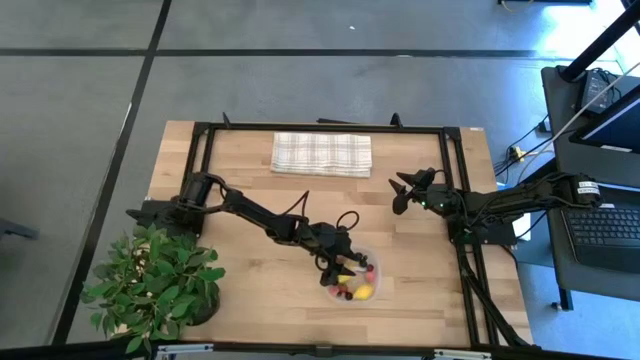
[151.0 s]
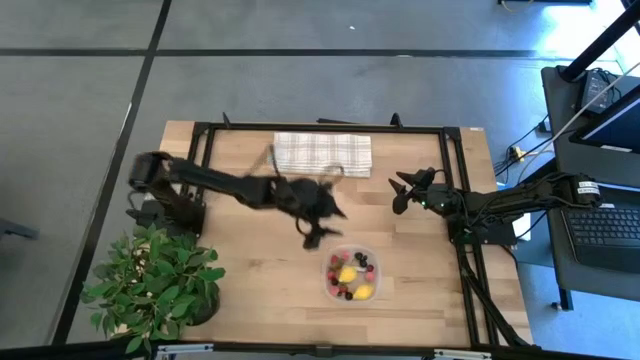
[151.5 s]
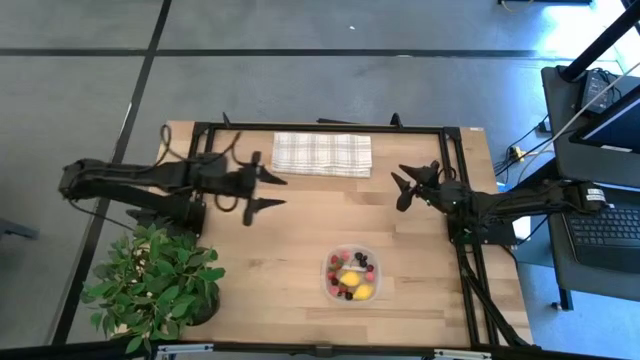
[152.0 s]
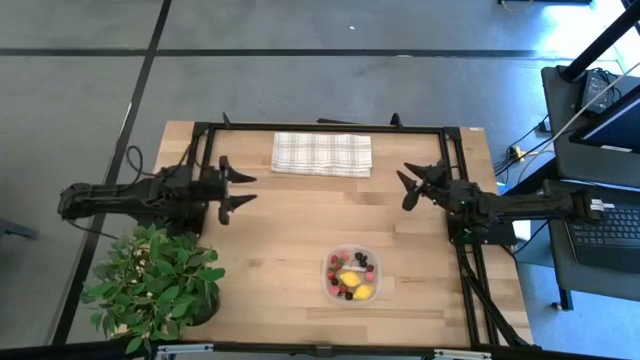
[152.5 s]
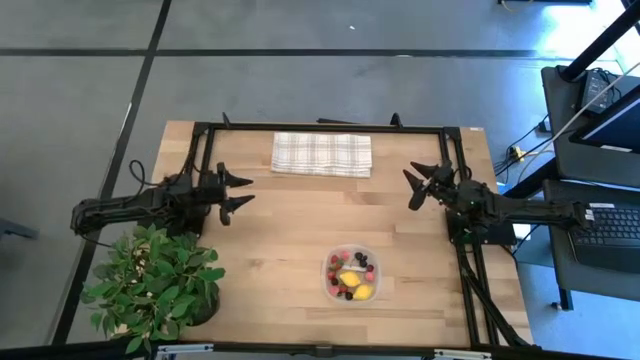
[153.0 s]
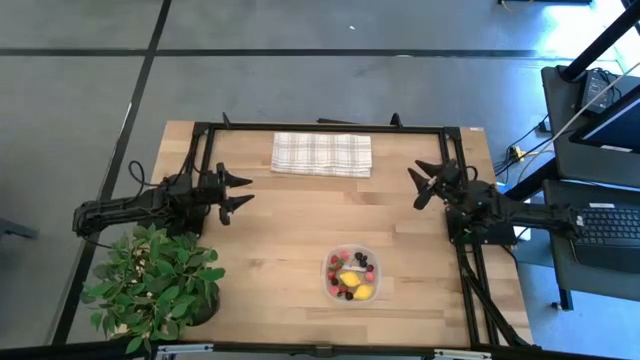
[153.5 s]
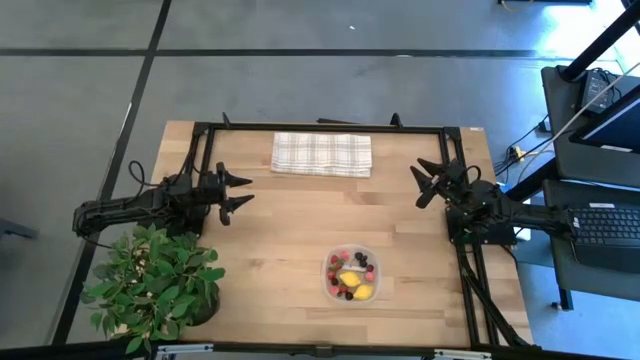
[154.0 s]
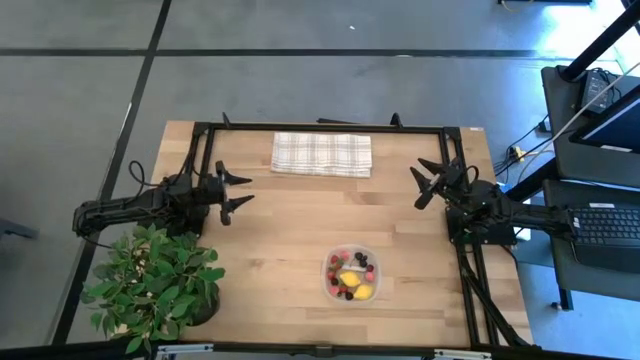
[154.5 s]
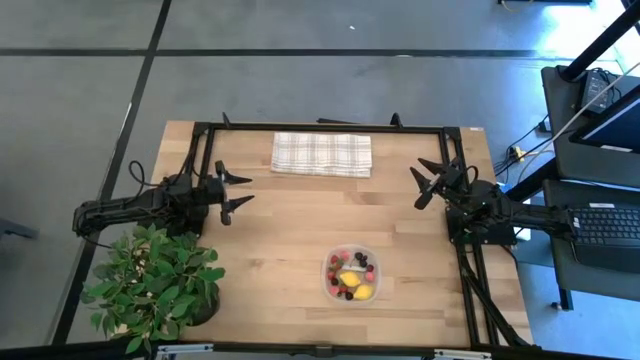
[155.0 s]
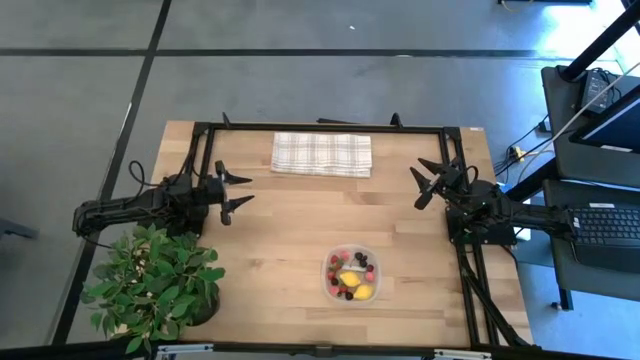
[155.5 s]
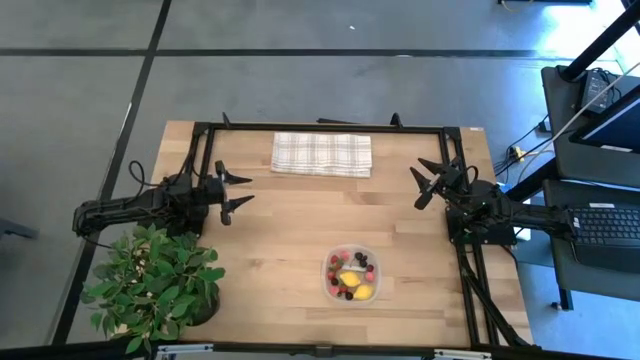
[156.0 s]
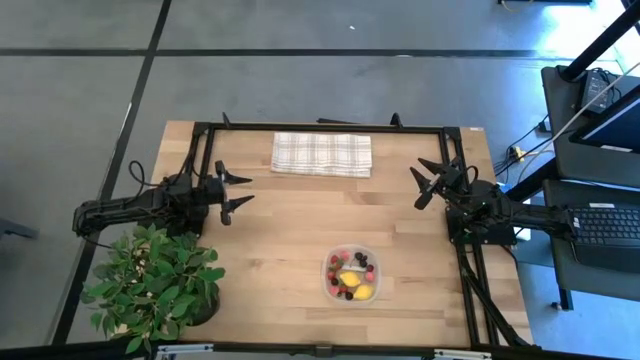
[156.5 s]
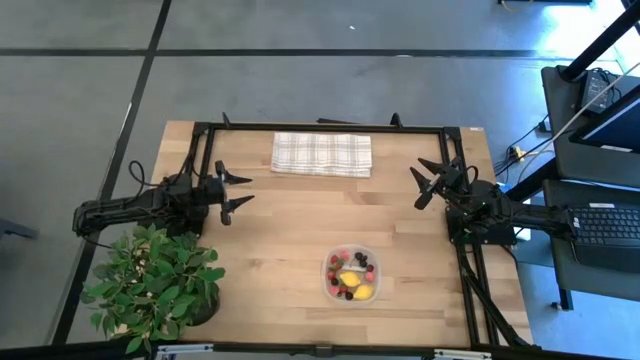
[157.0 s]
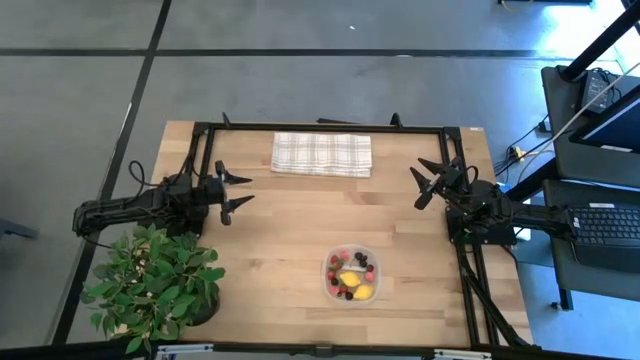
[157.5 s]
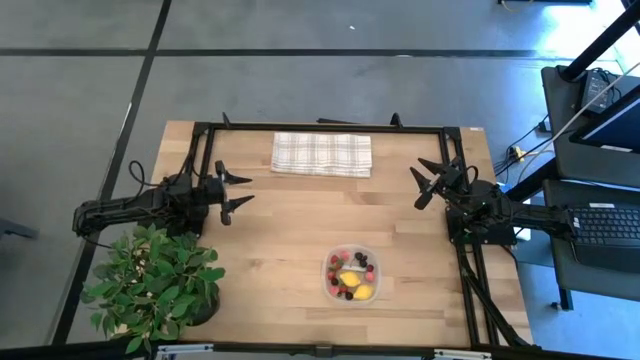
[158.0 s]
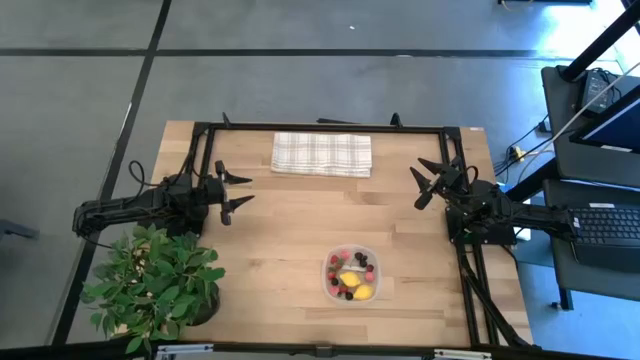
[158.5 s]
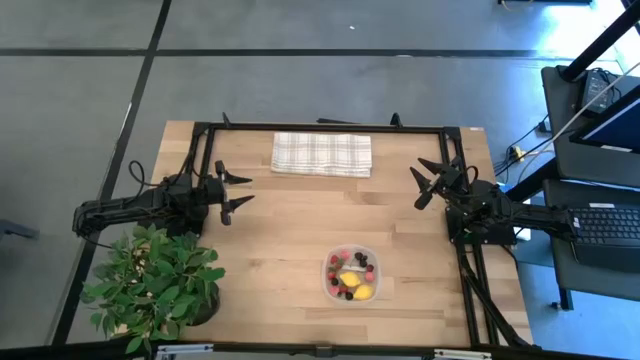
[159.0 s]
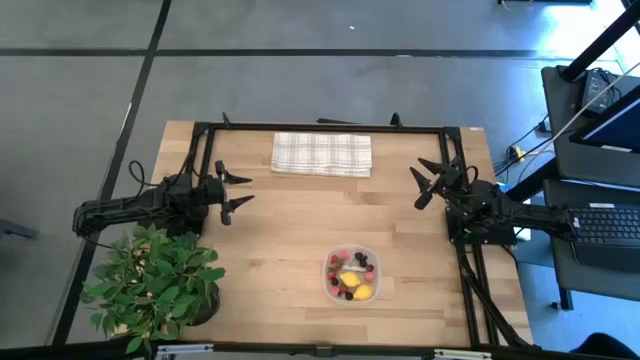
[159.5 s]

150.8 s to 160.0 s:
Task: Pick and placing Produce into tupperware
Return to Home Position

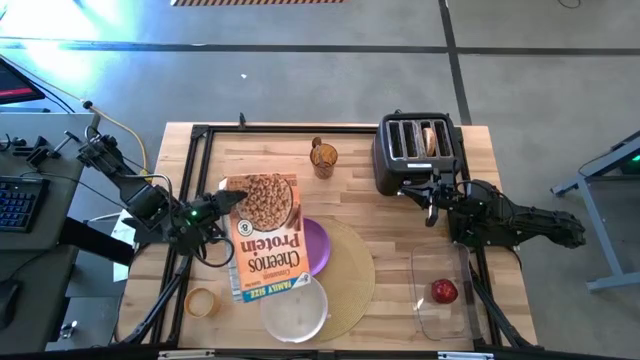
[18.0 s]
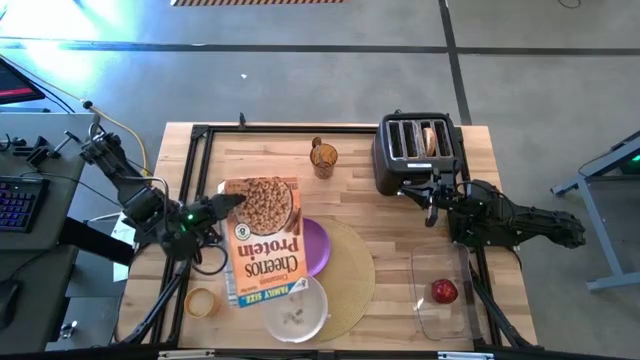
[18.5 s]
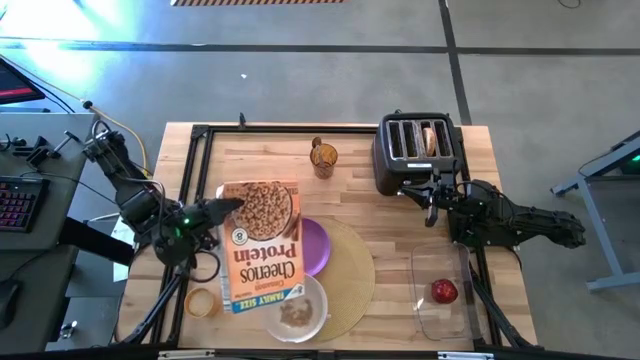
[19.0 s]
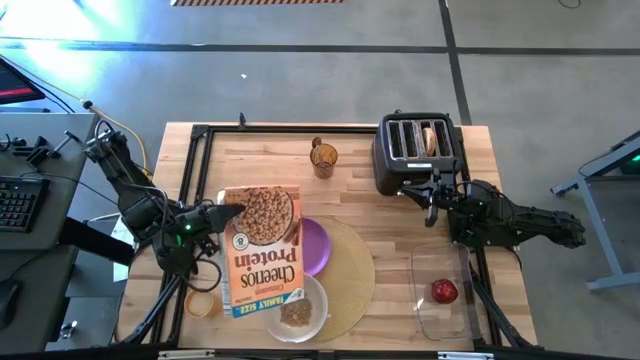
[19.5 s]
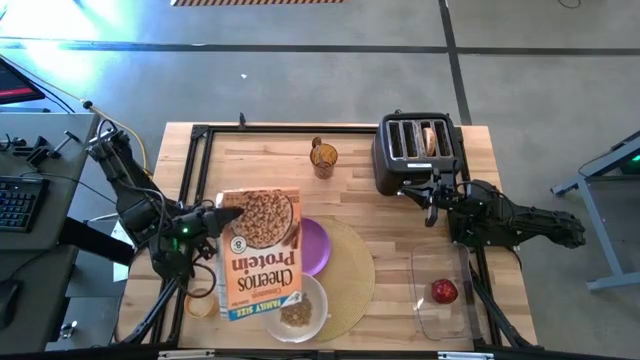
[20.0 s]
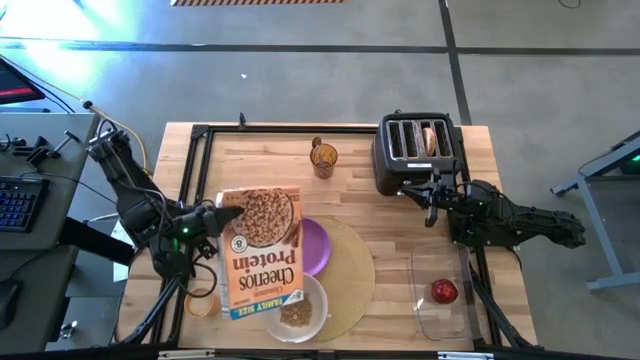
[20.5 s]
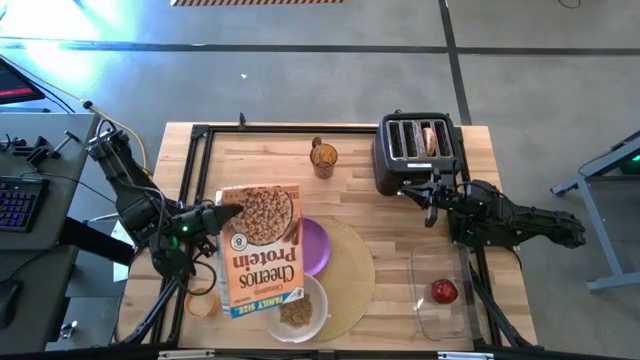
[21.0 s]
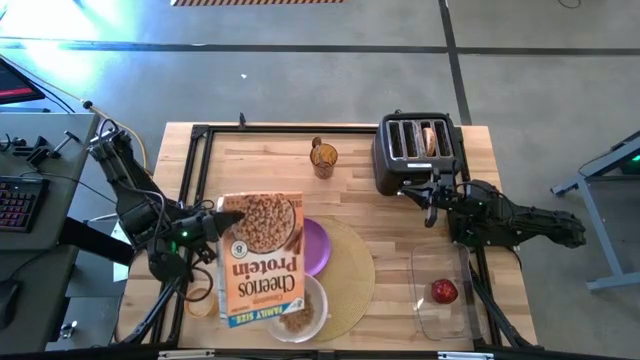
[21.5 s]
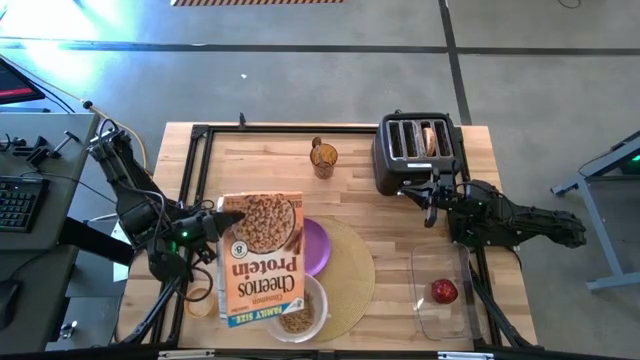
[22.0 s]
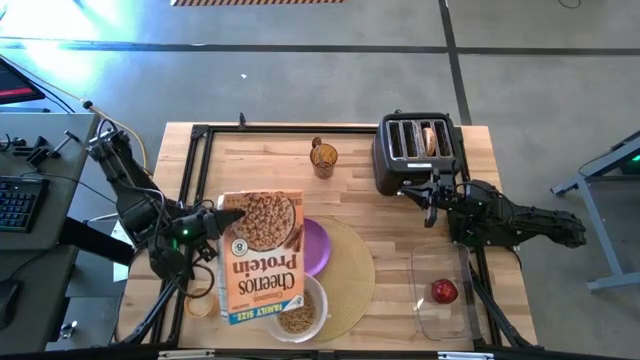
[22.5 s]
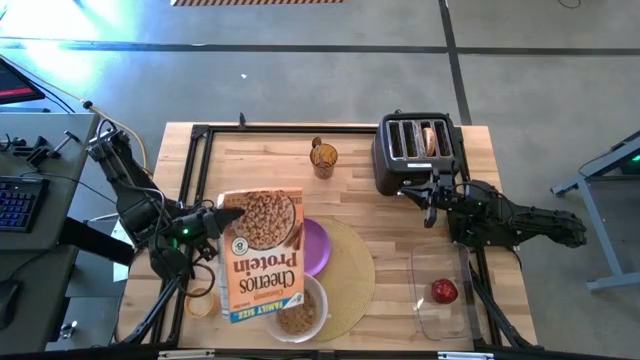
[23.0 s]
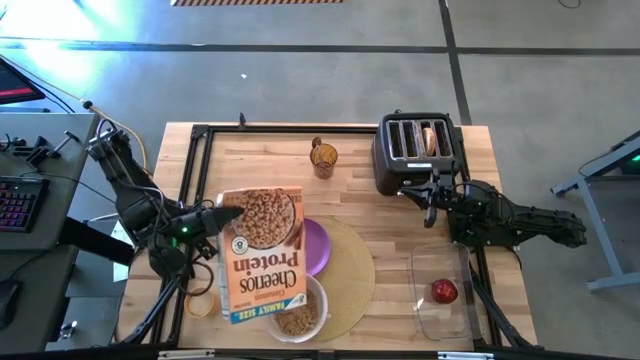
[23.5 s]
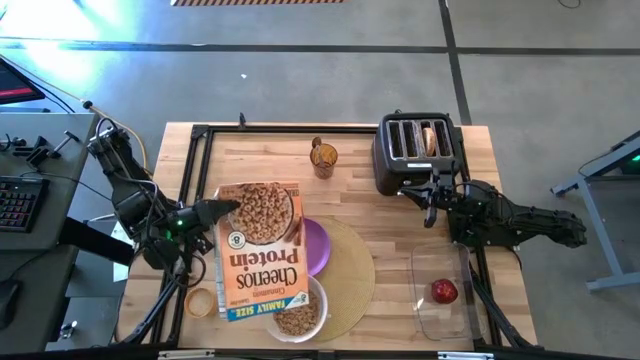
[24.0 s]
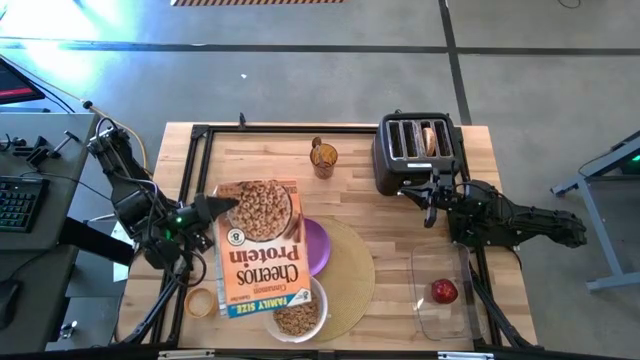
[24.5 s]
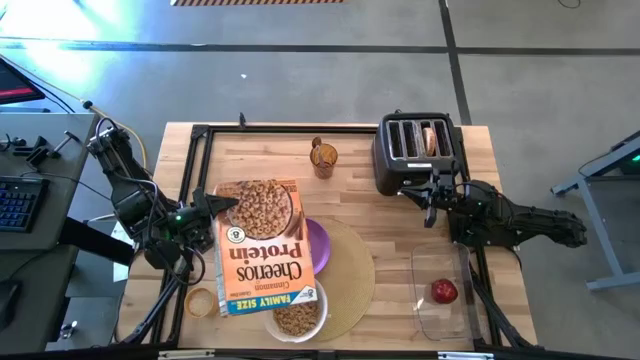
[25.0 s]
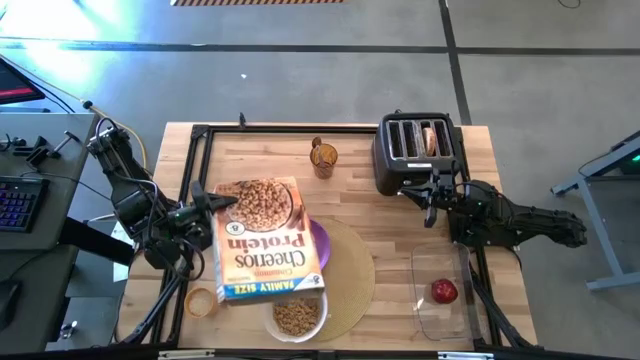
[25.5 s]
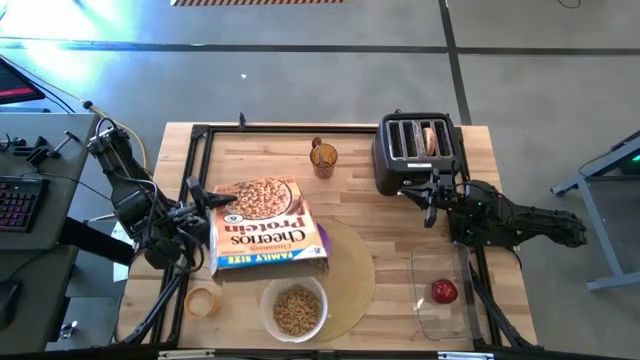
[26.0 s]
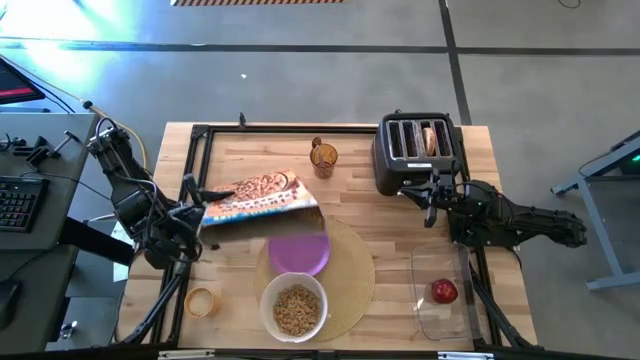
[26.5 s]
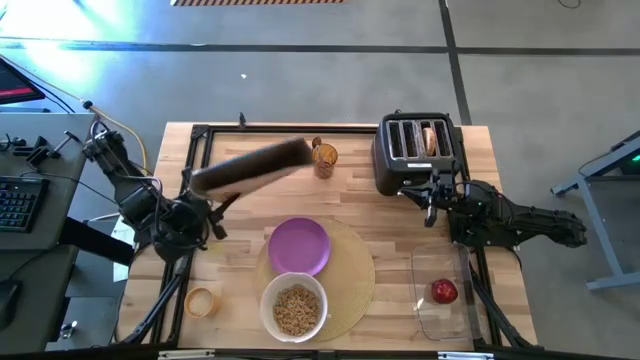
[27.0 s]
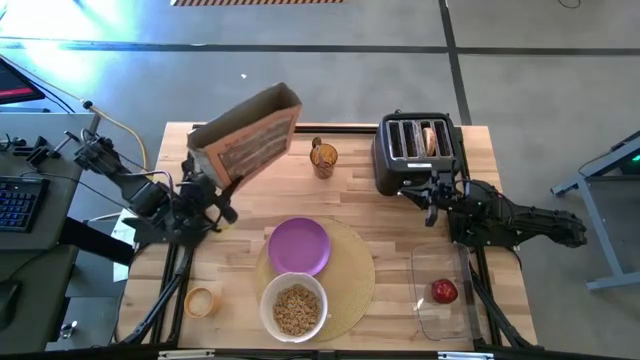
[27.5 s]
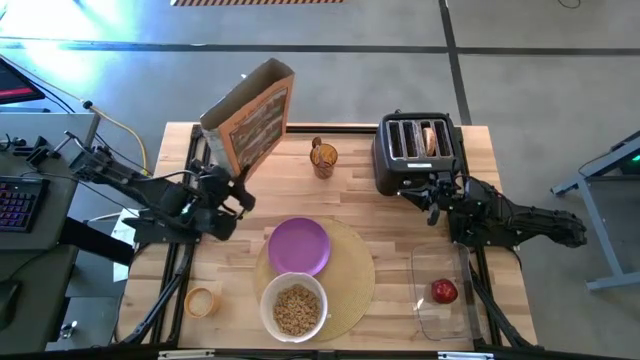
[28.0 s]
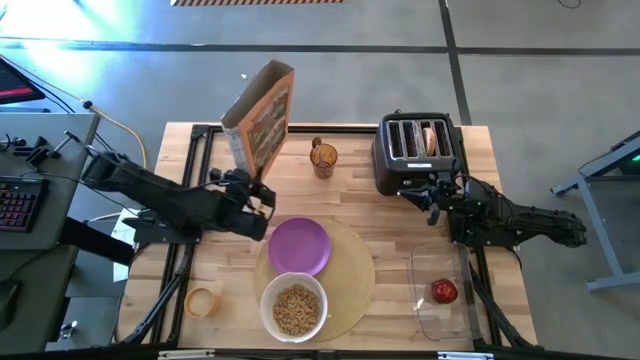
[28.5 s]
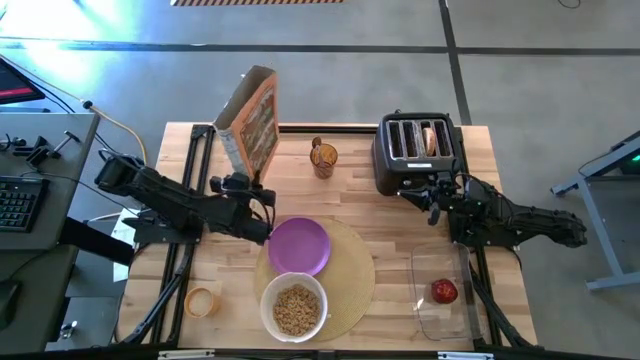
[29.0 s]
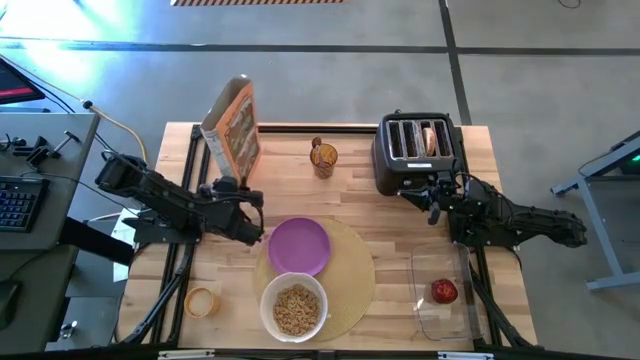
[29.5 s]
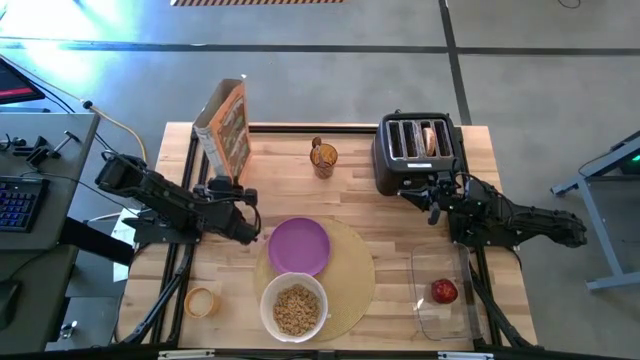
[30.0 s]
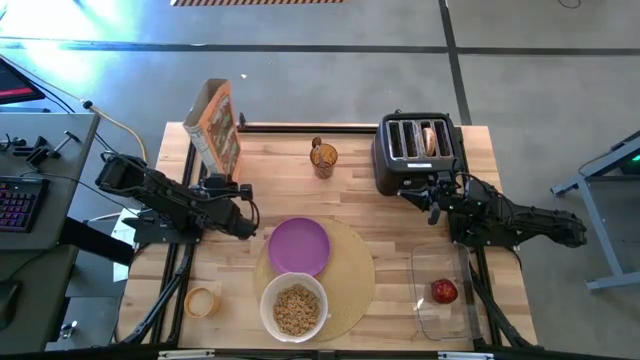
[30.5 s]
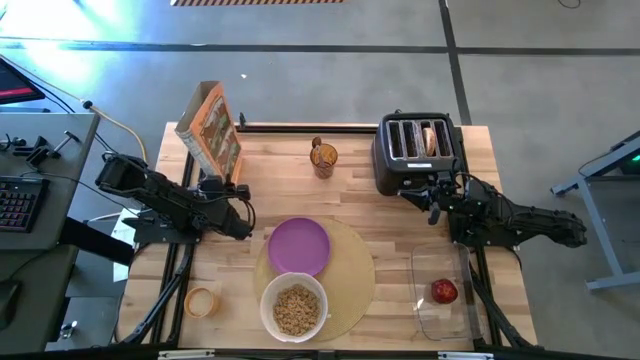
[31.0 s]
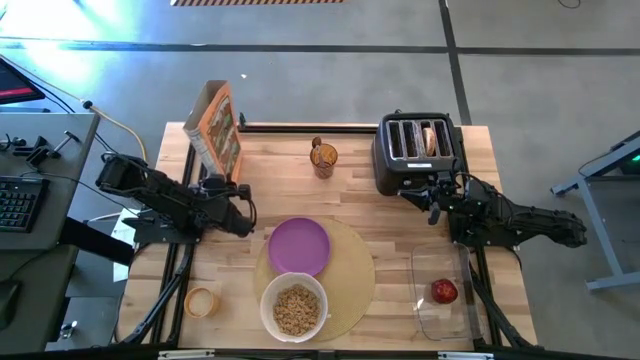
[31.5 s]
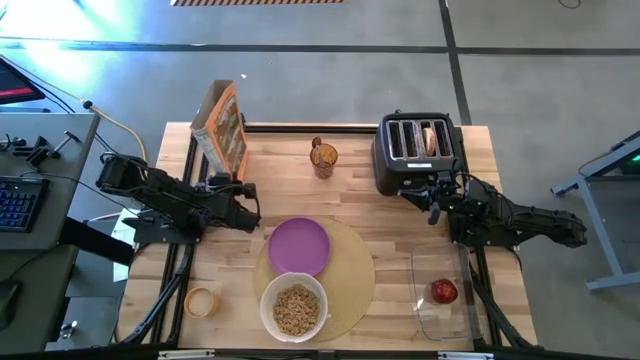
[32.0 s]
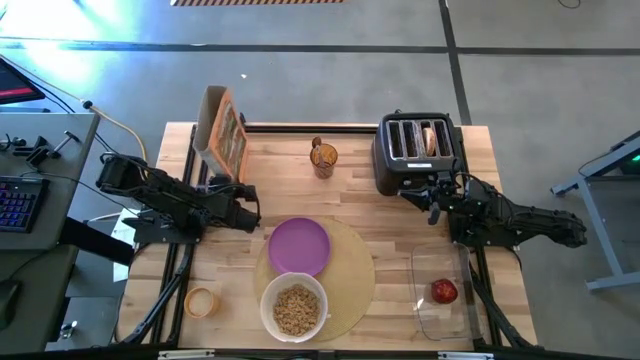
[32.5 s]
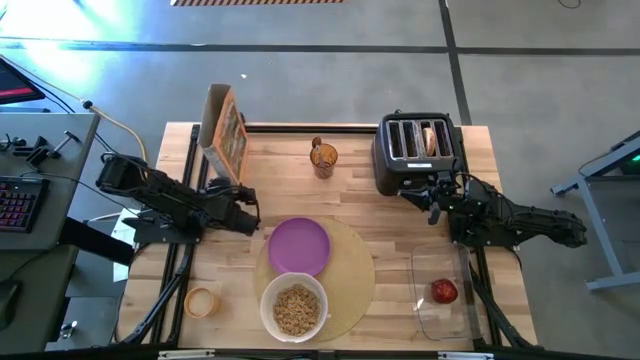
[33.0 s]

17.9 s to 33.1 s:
Task: Arrange a breakfast setting
Pour the cereal from the cereal box into the white bowl
